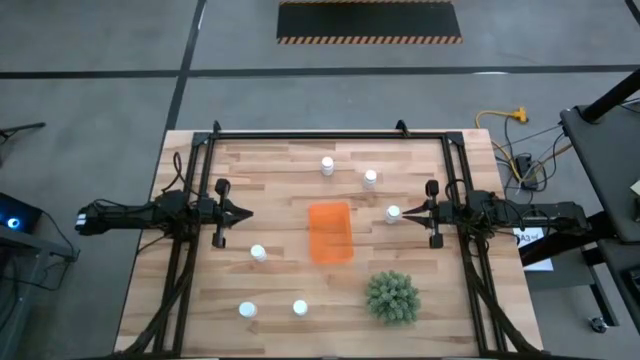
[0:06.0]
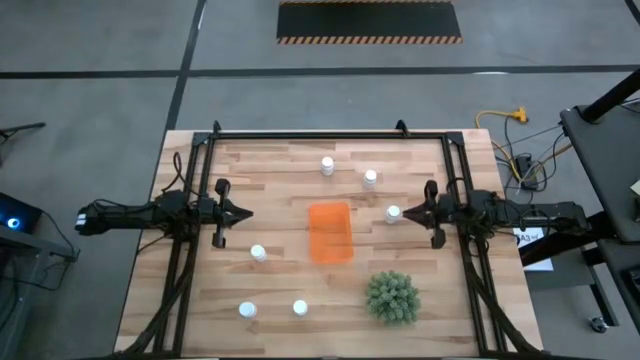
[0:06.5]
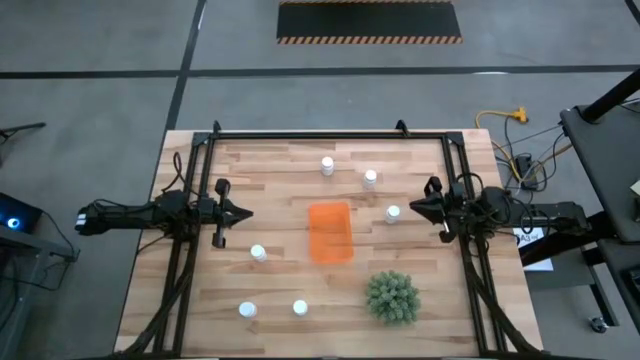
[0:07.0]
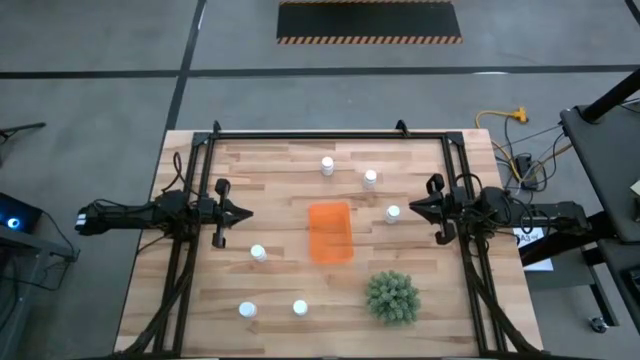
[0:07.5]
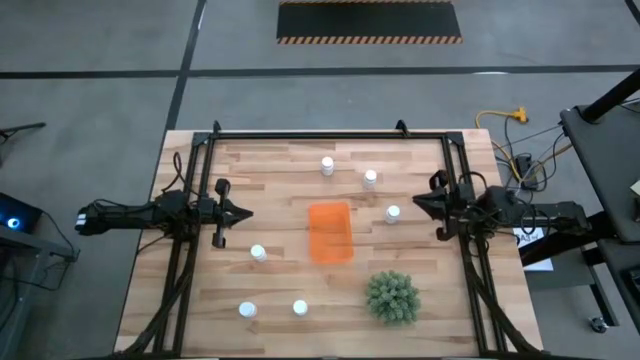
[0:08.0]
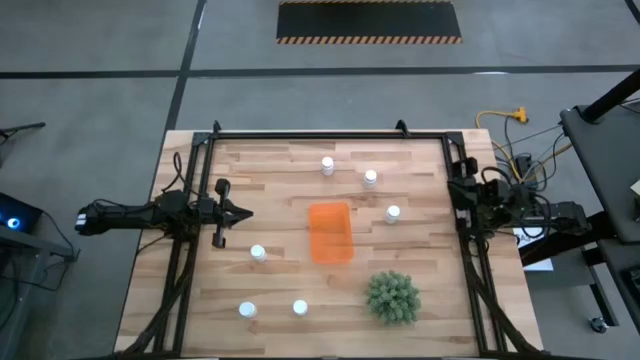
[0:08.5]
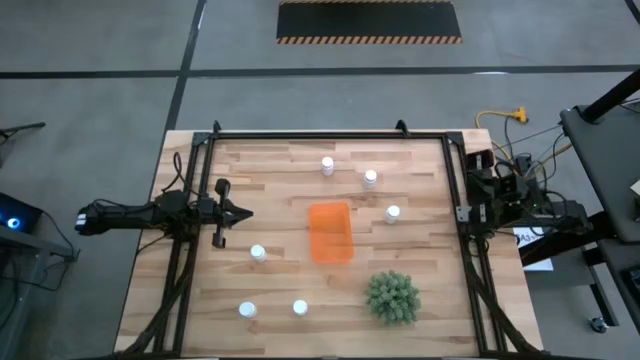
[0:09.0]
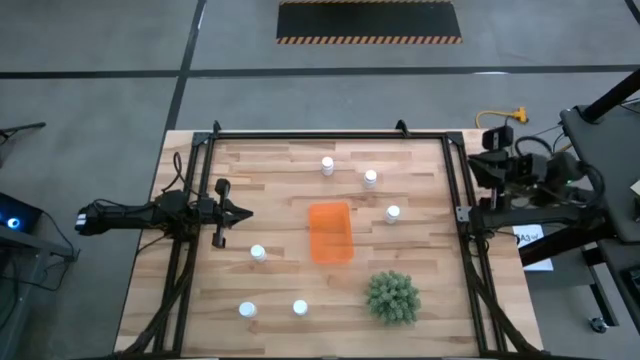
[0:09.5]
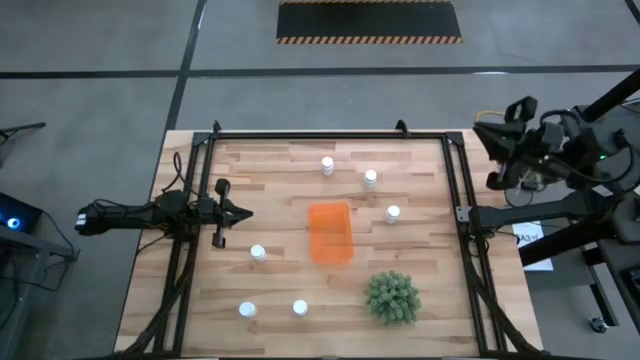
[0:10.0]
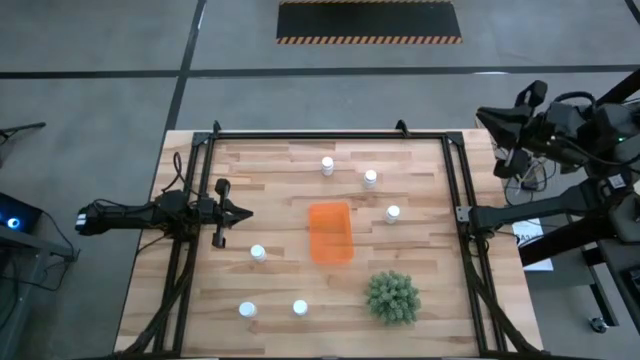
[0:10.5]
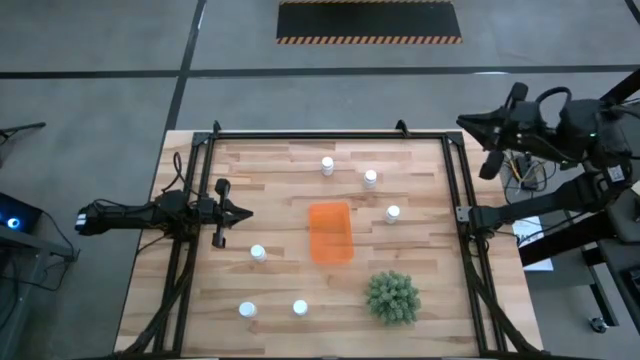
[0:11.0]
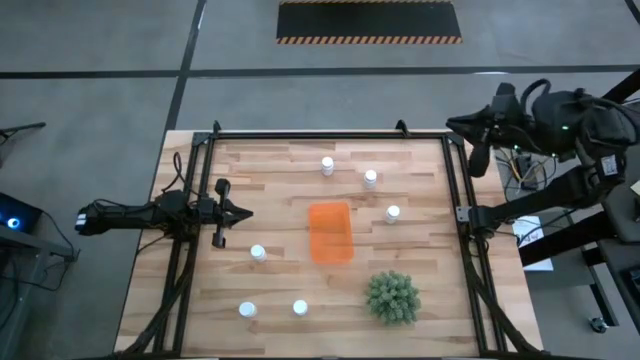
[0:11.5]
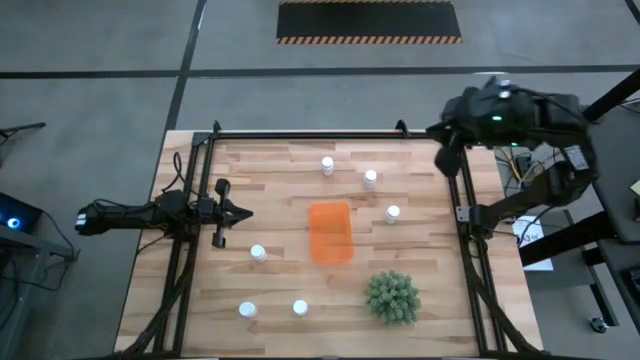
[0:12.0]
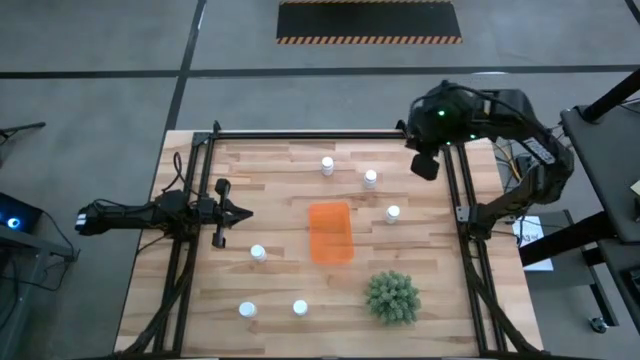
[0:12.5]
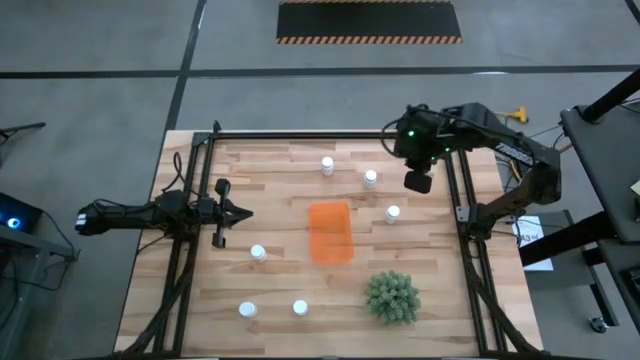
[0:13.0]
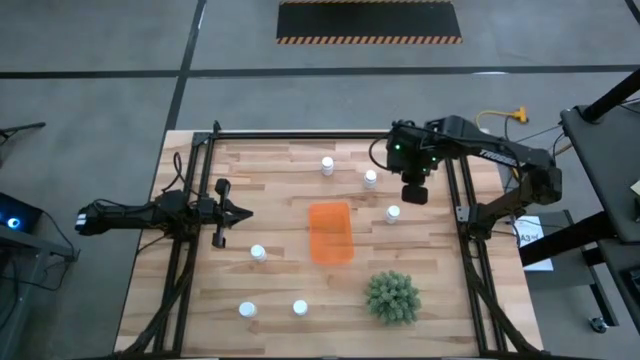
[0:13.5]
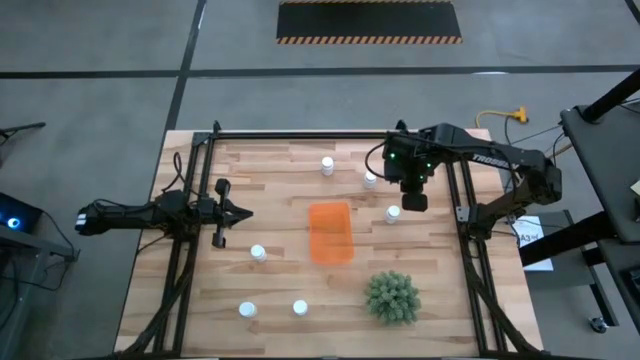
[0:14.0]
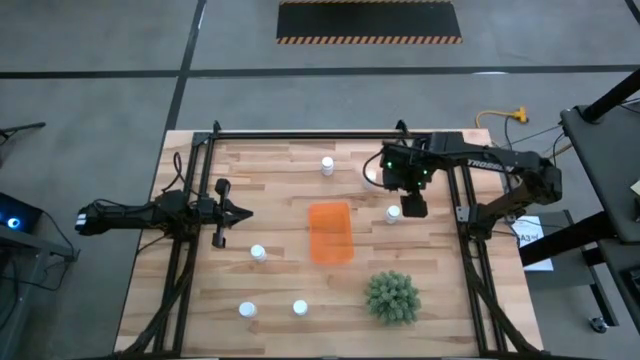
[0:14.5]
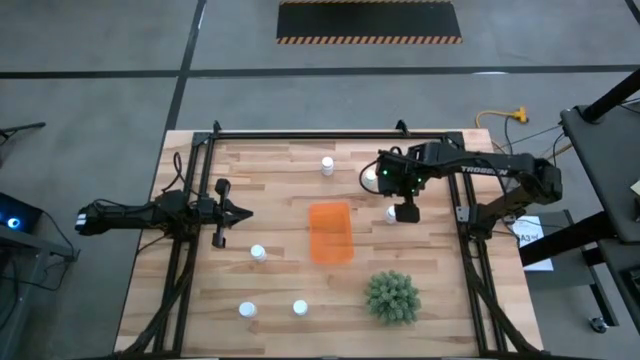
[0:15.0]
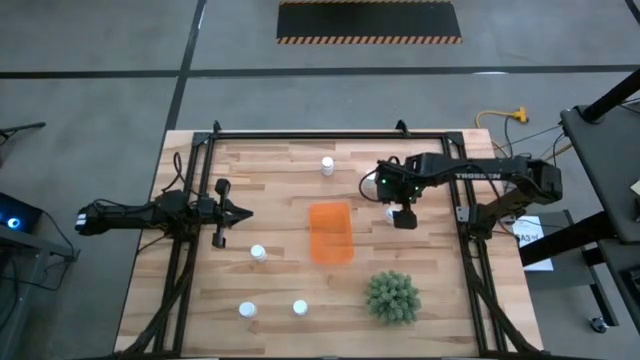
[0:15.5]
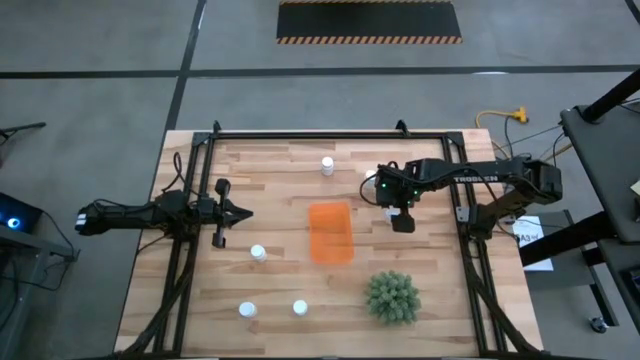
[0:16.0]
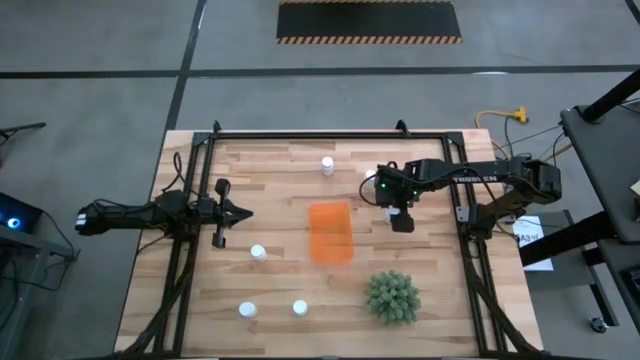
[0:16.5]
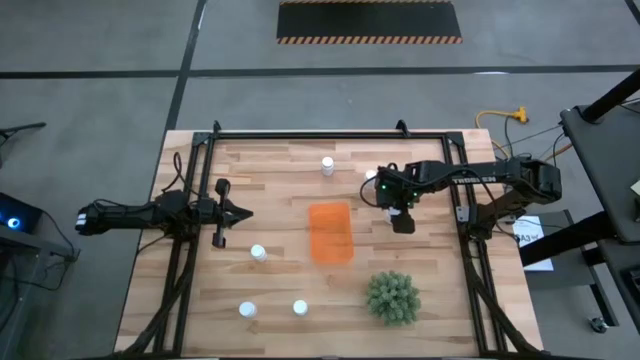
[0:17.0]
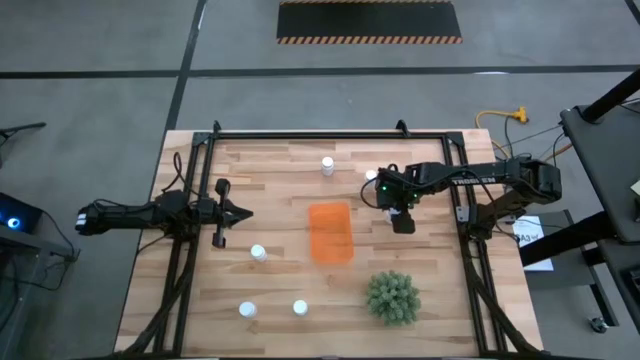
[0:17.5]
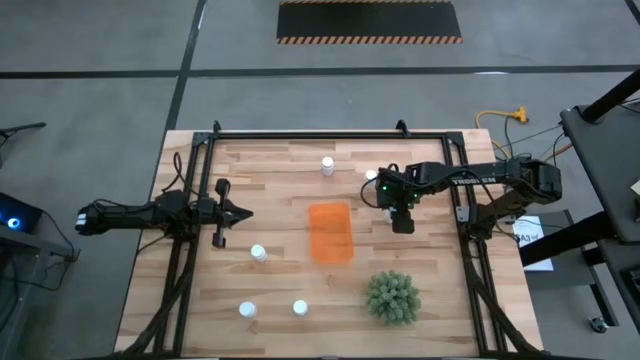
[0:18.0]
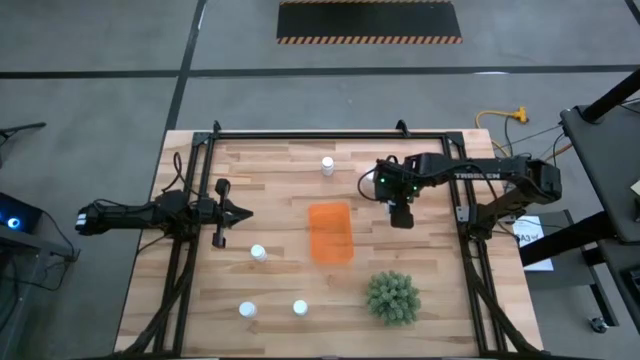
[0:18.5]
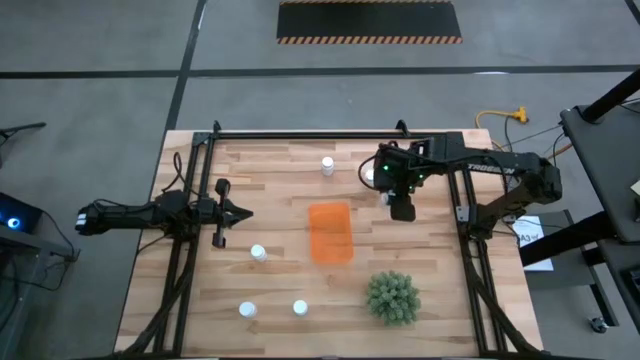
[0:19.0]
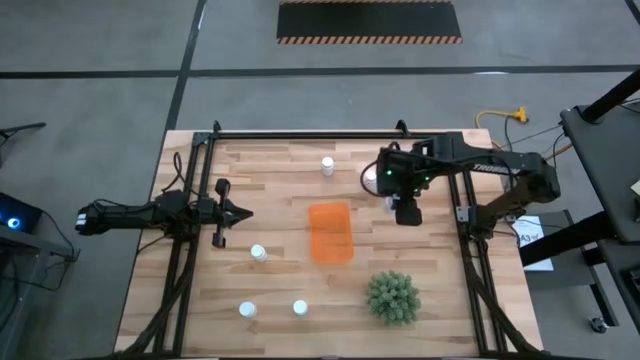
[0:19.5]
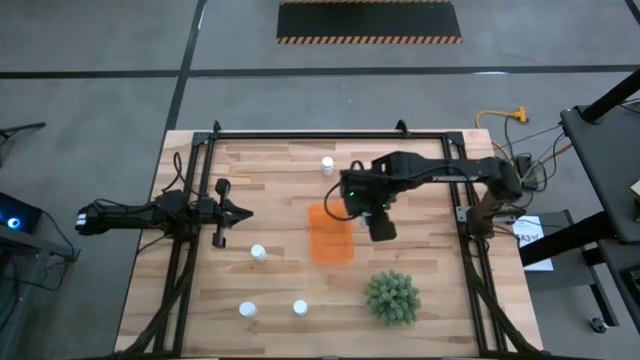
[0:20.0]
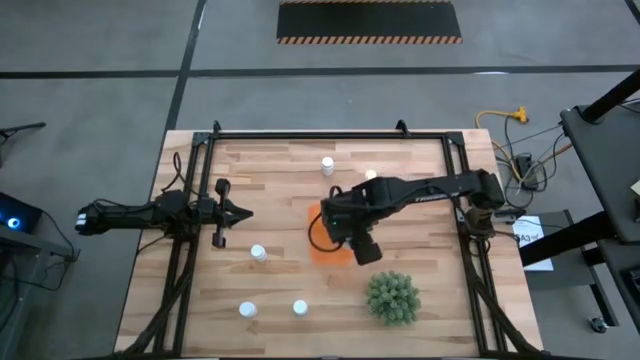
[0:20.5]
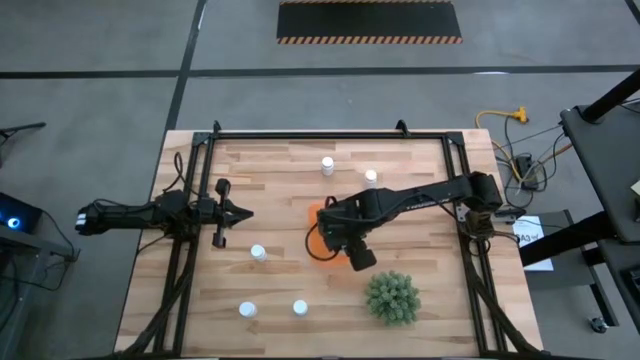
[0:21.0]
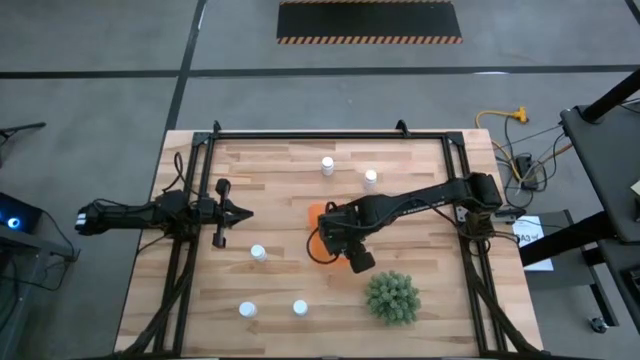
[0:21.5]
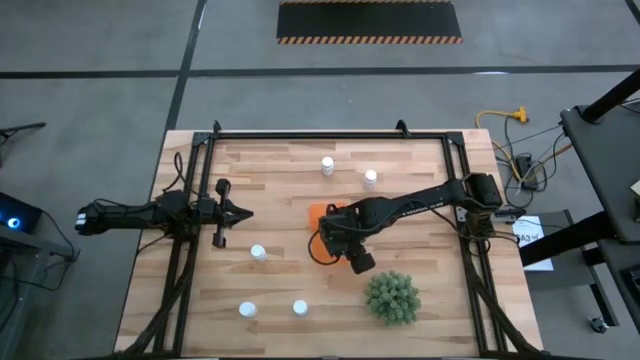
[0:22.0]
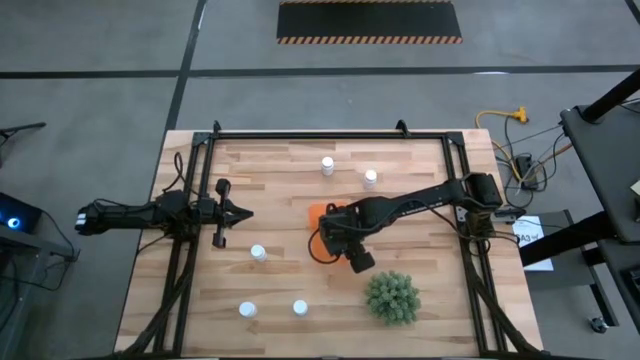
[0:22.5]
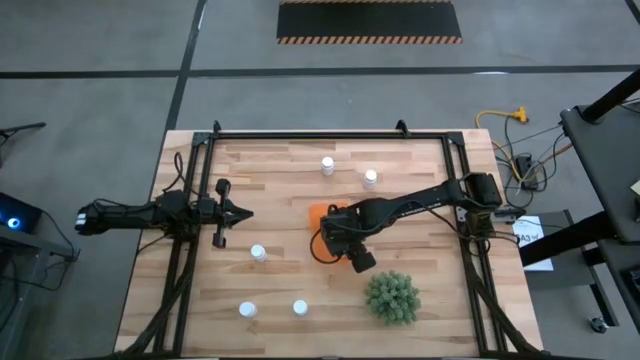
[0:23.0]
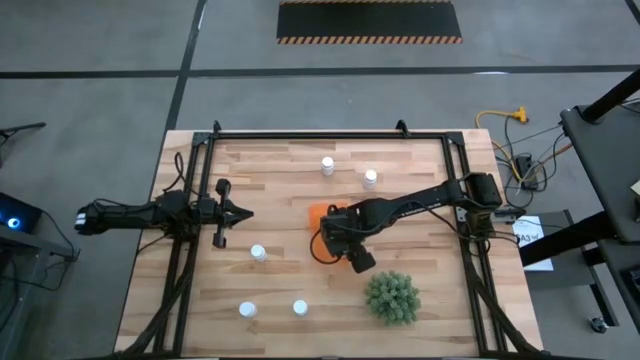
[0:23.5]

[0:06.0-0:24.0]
Task: Pick and place pill bottles into a basket
Put the white pill bottle into the orange bin

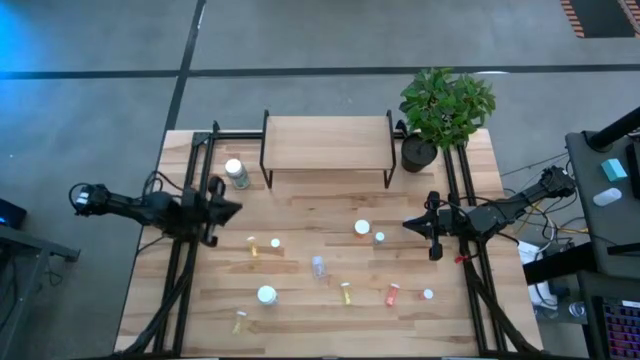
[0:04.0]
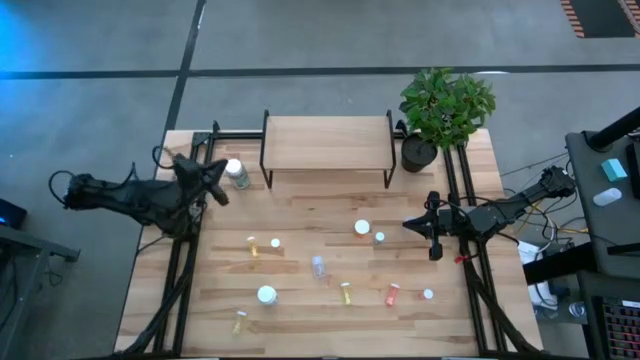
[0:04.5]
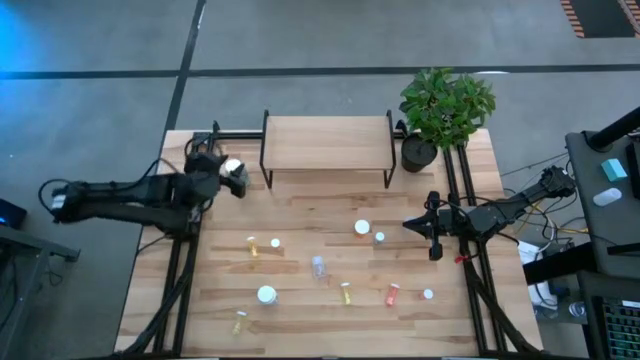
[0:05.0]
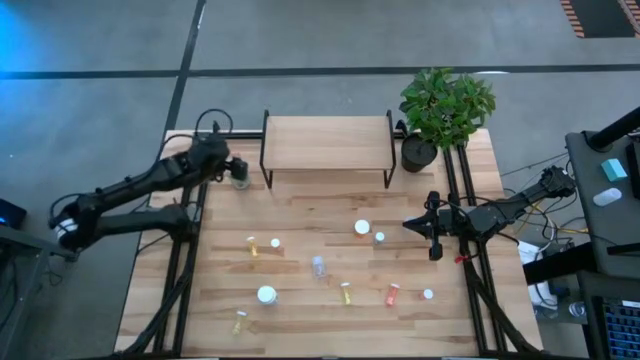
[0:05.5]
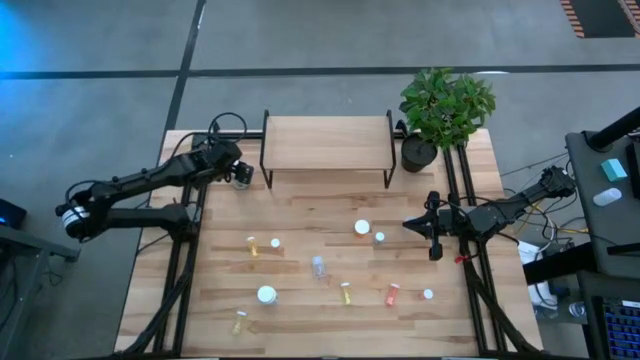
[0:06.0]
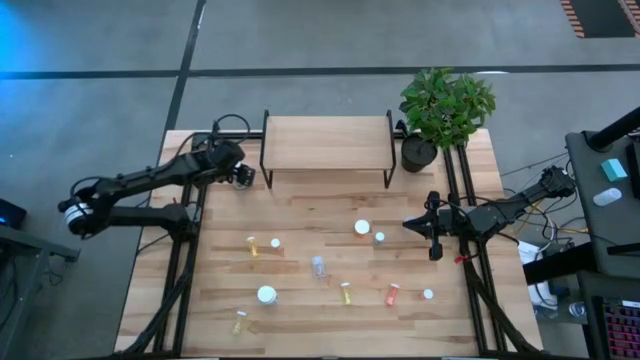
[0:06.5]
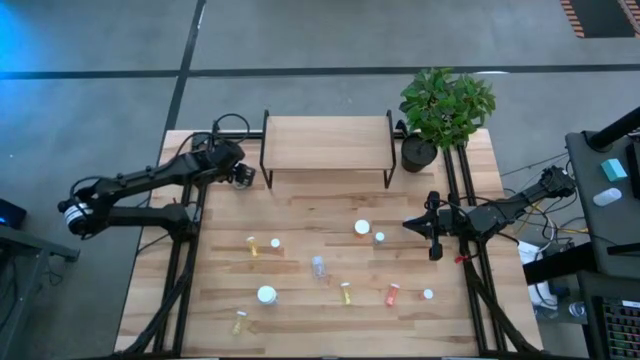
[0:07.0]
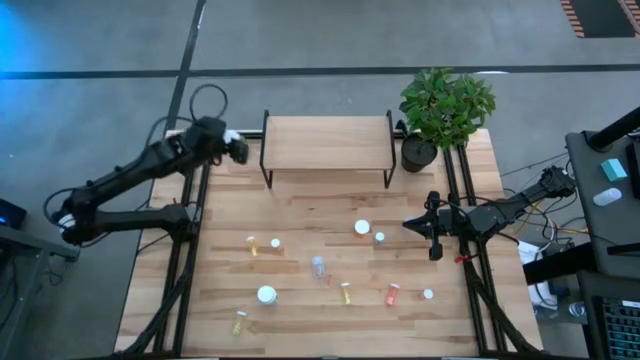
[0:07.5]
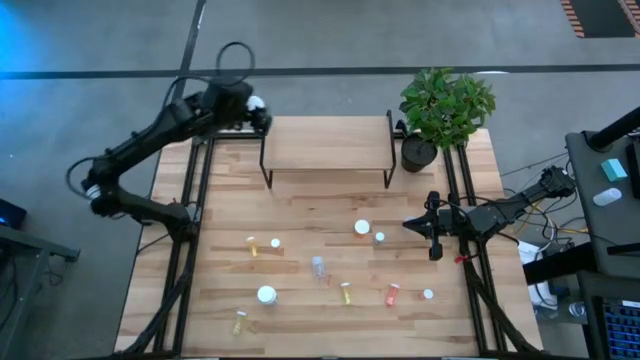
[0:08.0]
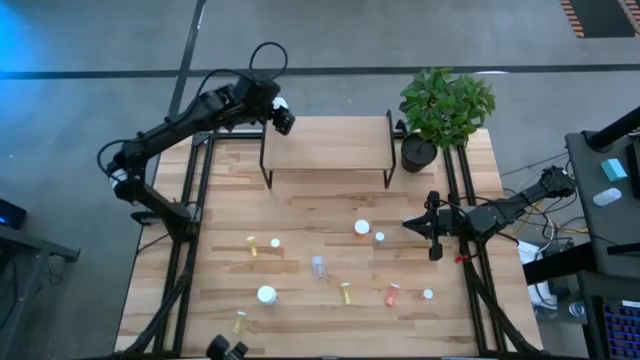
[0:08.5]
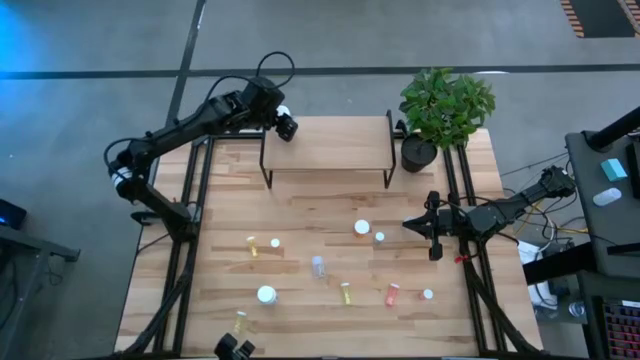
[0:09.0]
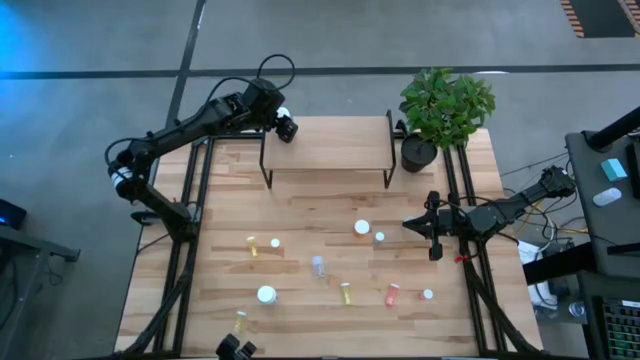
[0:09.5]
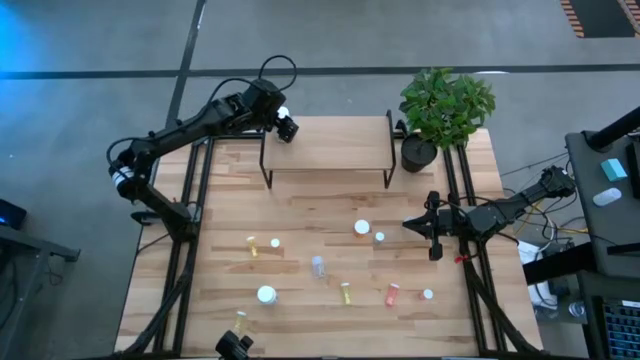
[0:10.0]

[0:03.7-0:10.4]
Task: Pick and place medicine bottles onto shelf by color
Put the green pill bottle on the shelf
